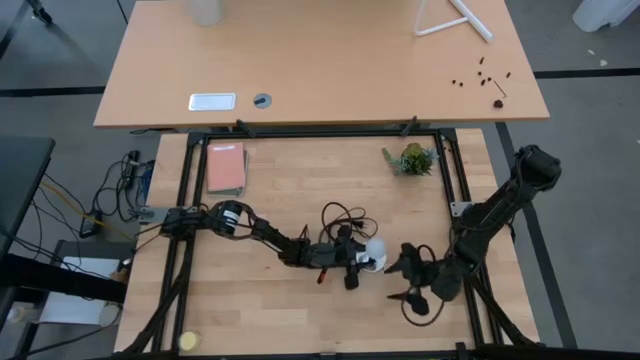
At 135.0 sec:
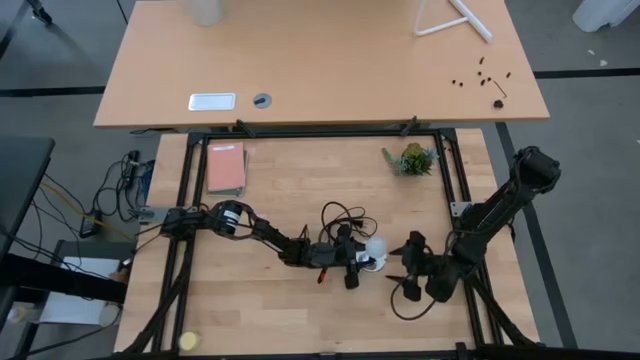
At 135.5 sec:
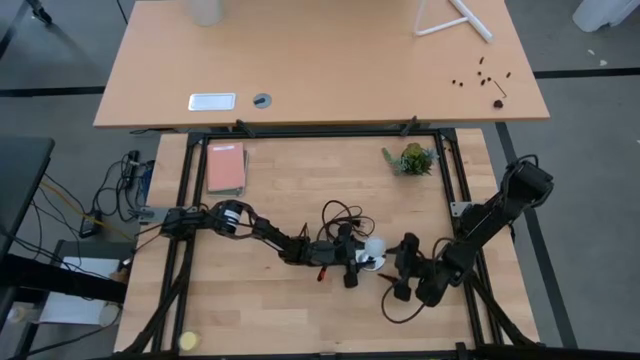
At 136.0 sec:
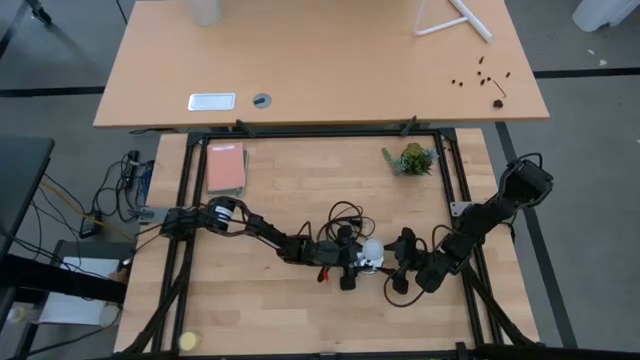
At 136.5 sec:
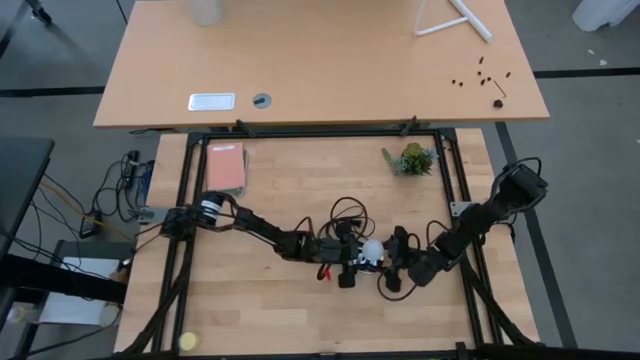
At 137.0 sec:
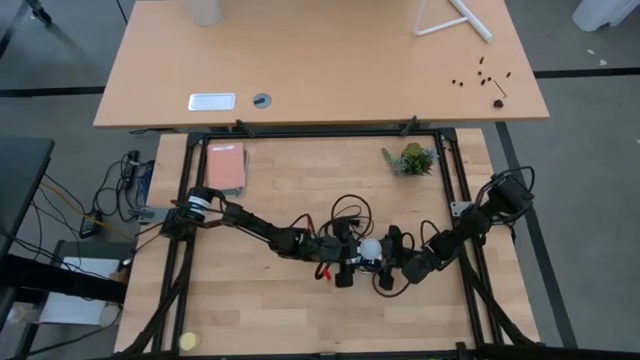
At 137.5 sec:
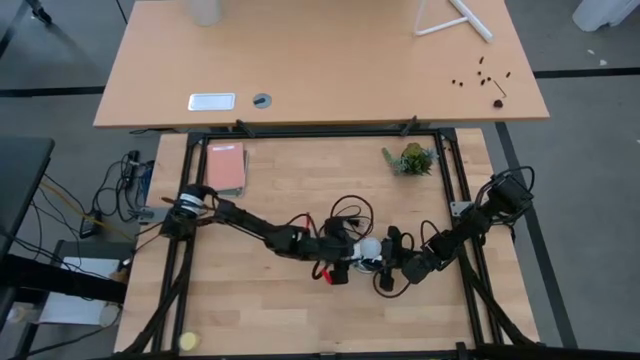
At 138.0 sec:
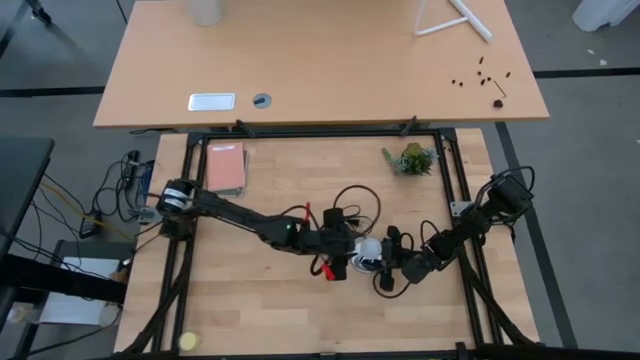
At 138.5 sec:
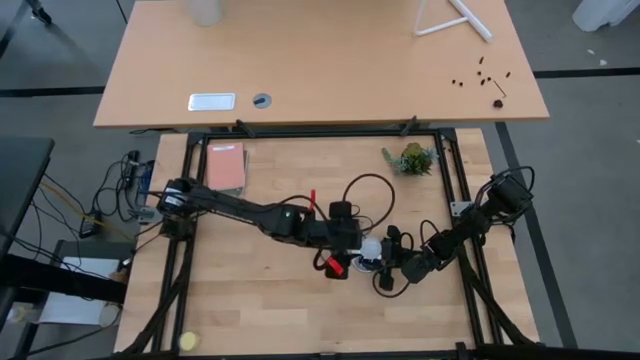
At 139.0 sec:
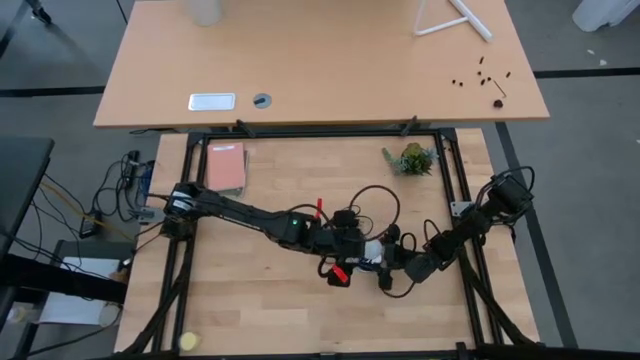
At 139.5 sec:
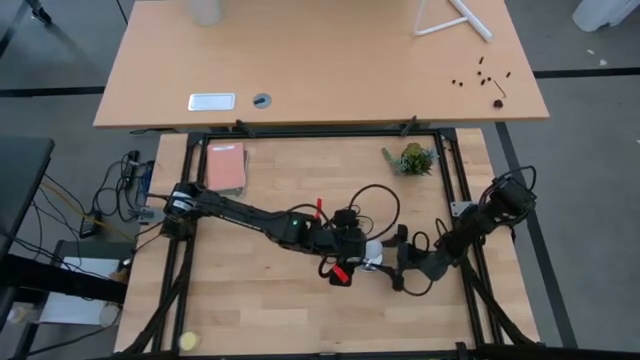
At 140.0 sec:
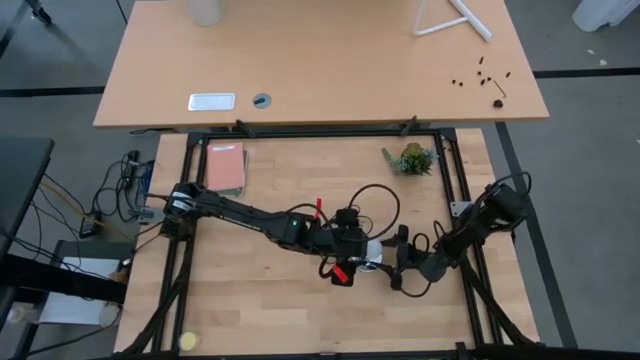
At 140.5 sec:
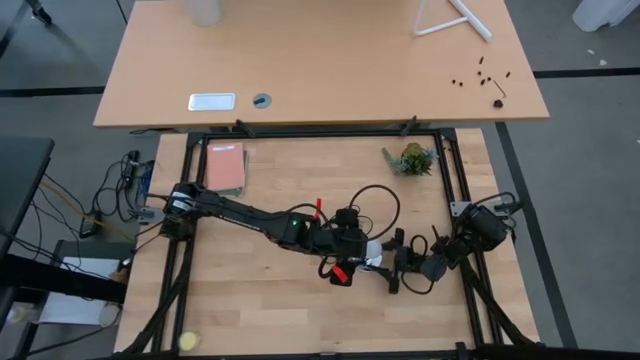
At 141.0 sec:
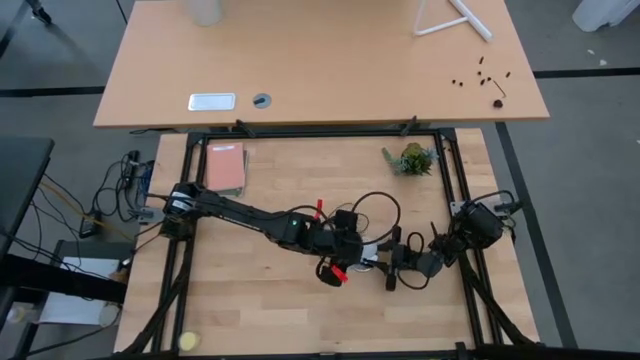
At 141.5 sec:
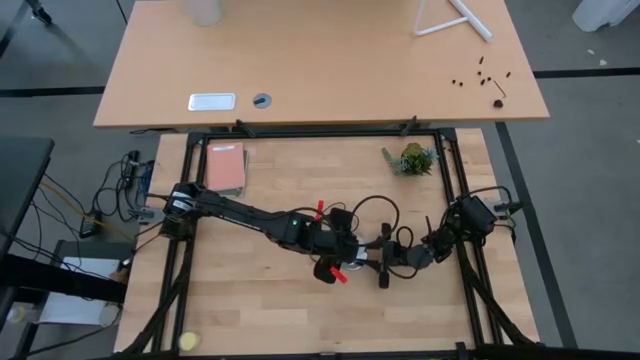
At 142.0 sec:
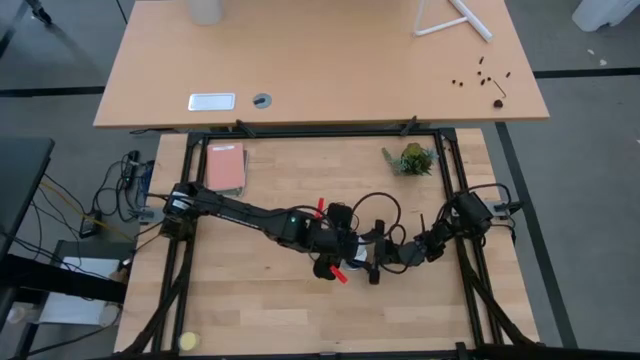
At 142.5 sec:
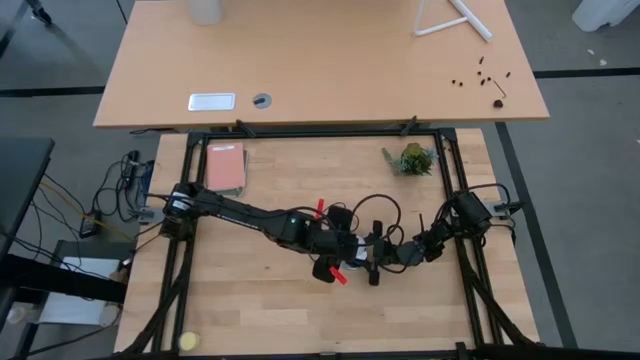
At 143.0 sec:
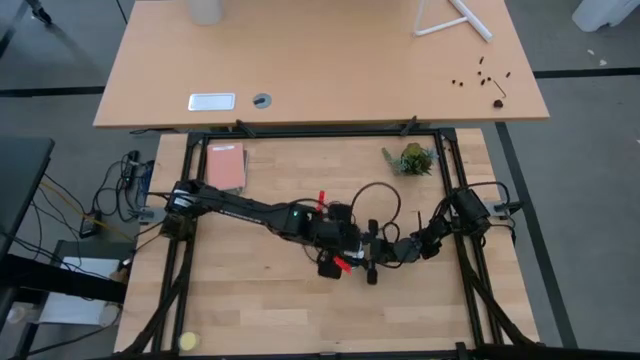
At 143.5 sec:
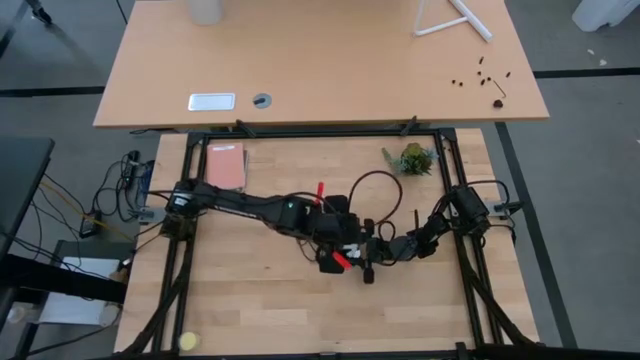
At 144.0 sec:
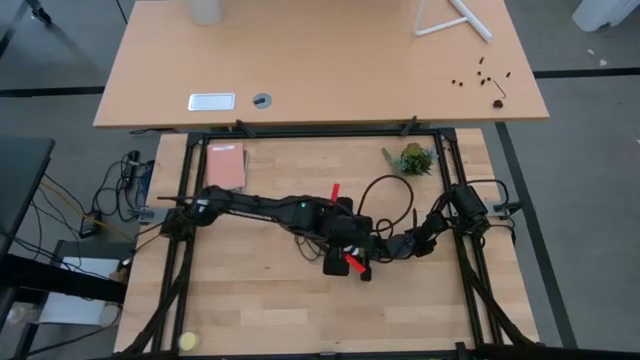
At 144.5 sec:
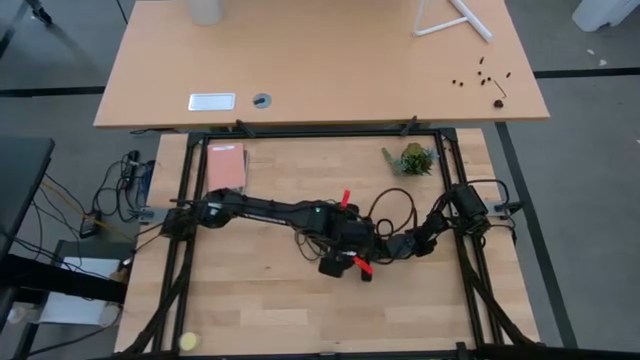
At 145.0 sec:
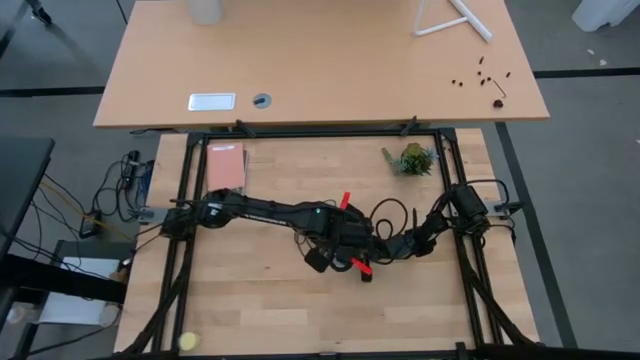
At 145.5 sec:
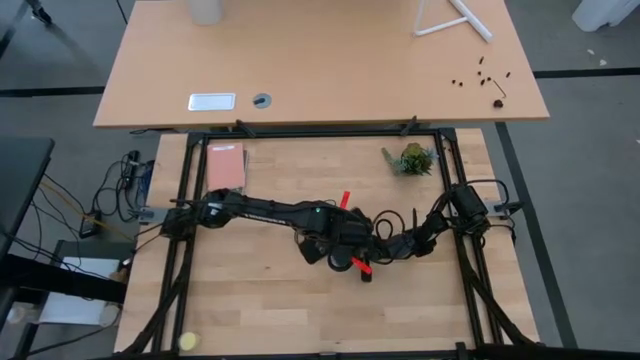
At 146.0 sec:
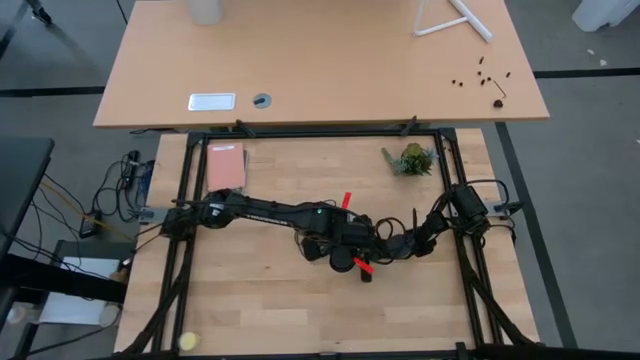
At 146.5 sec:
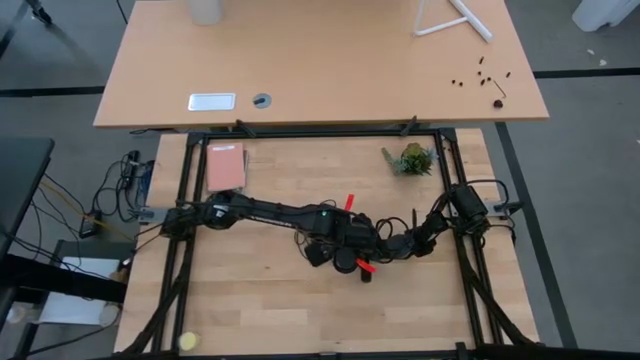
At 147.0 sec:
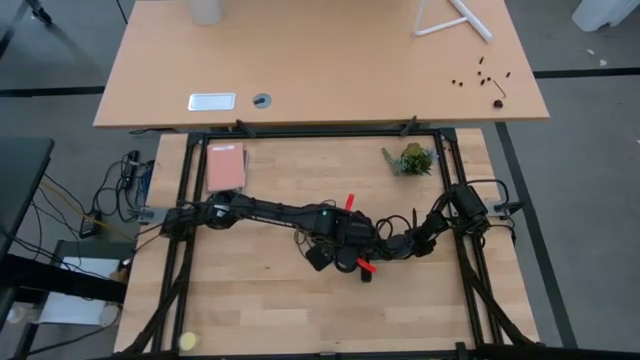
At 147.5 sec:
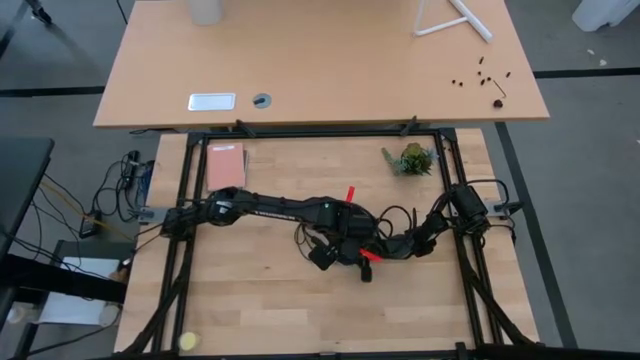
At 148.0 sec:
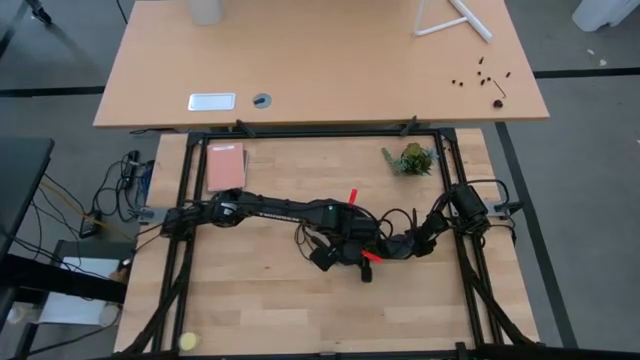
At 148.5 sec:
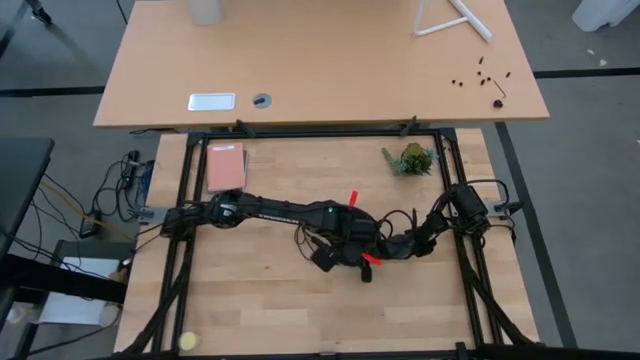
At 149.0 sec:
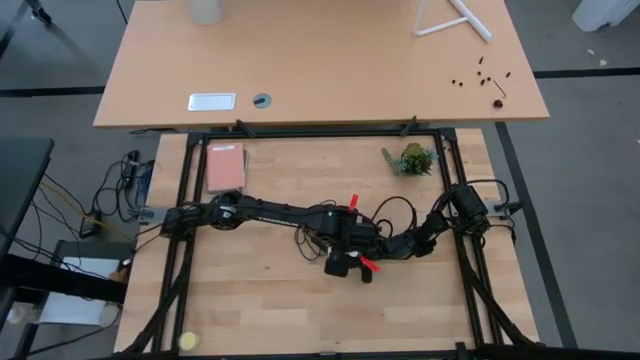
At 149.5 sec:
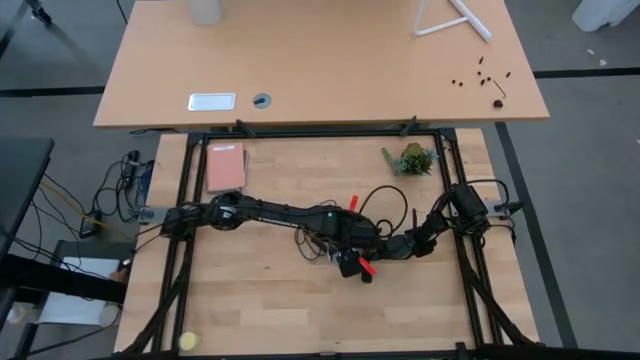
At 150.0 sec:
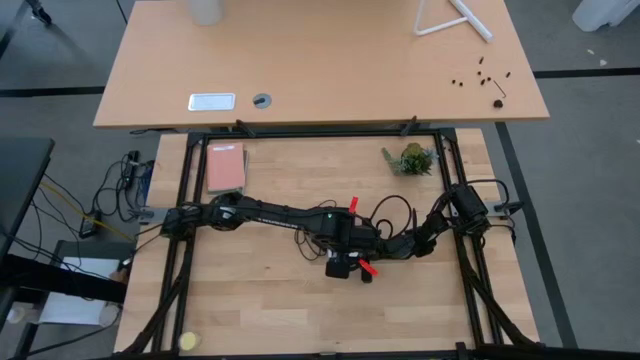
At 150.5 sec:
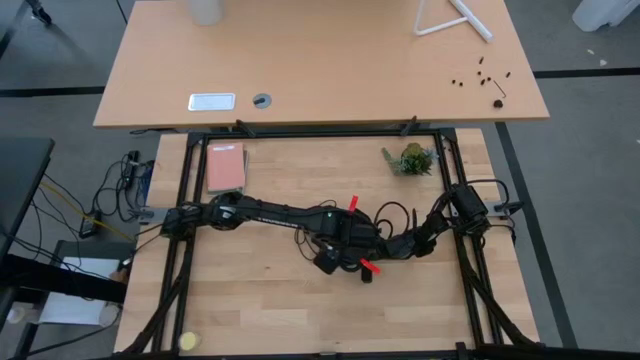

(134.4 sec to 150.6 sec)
Task: Screw lightbulb
Remove the lightbulb from the lamp

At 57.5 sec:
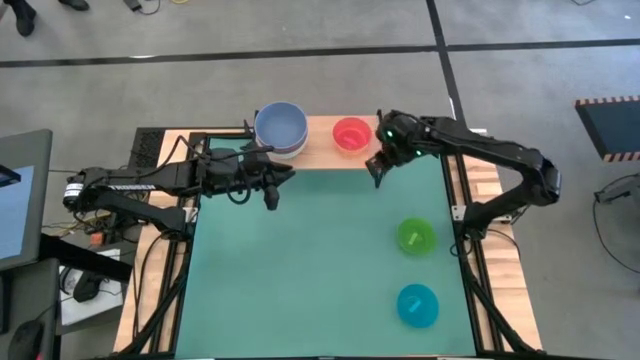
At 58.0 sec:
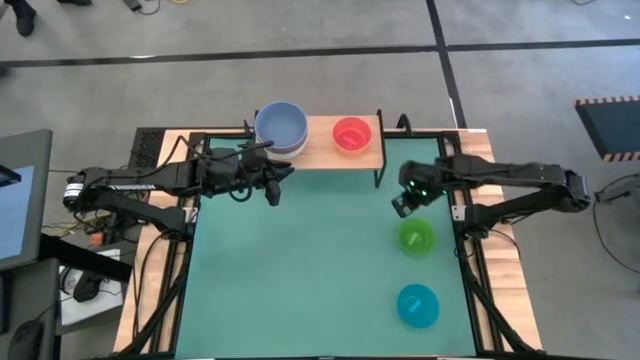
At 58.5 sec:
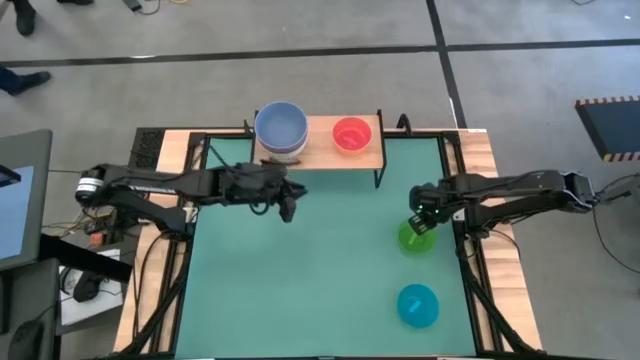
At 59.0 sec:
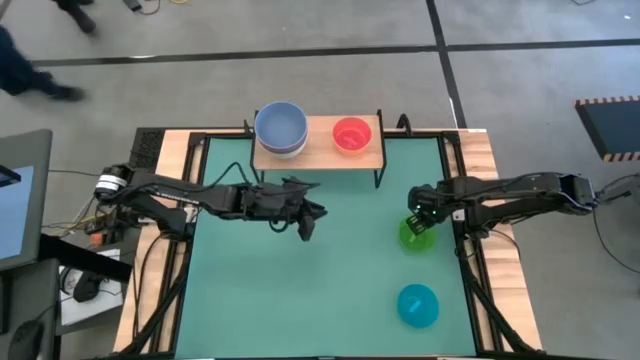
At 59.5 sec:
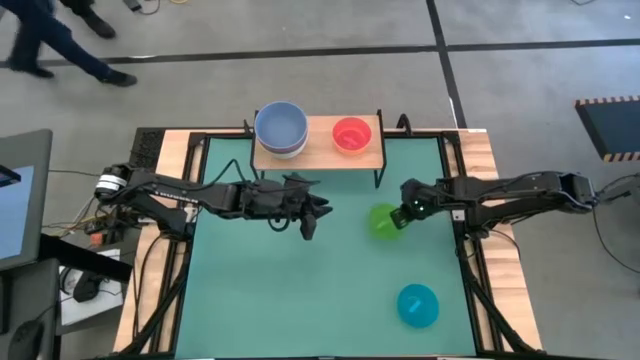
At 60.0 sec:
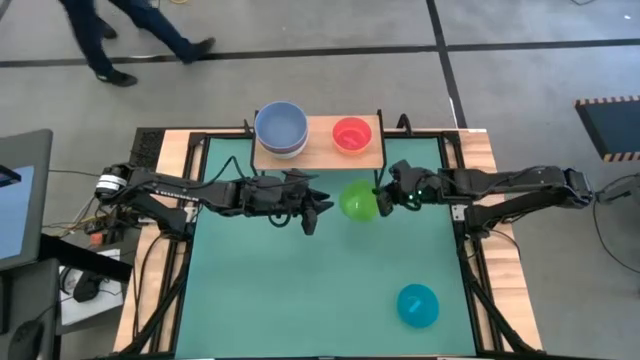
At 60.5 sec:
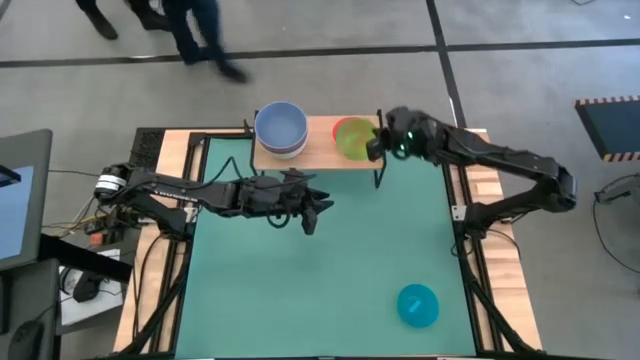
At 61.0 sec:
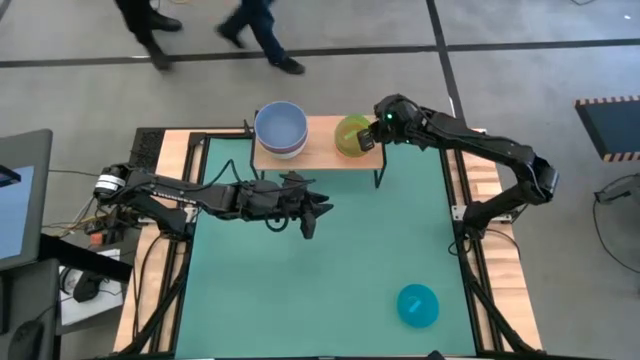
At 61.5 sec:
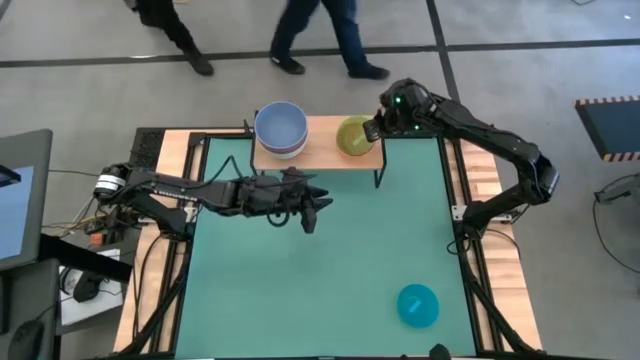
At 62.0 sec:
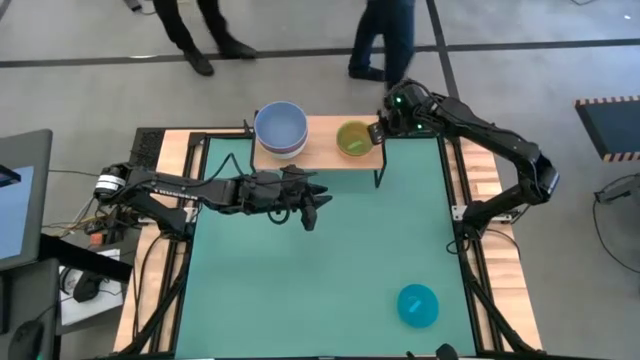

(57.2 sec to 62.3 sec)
Task: Place and stack bowls onto a shelf
Stack the small light green bowl on the small pink bowl on the shelf
